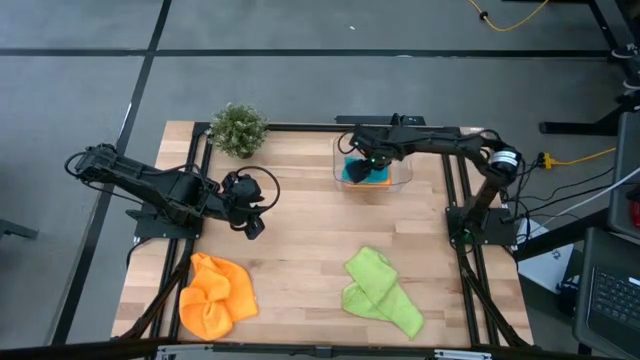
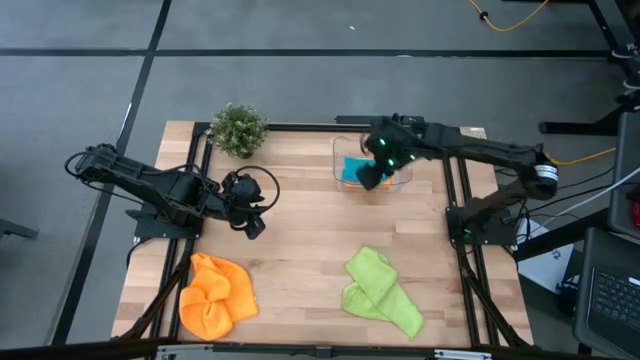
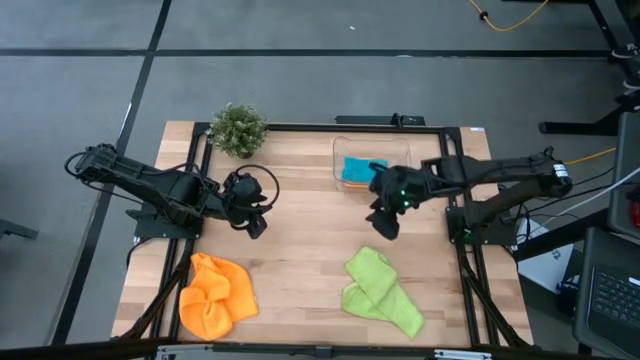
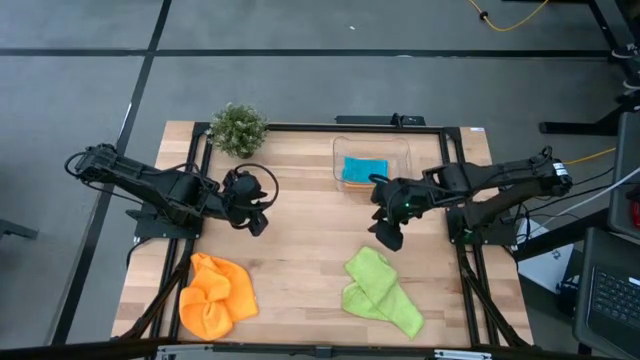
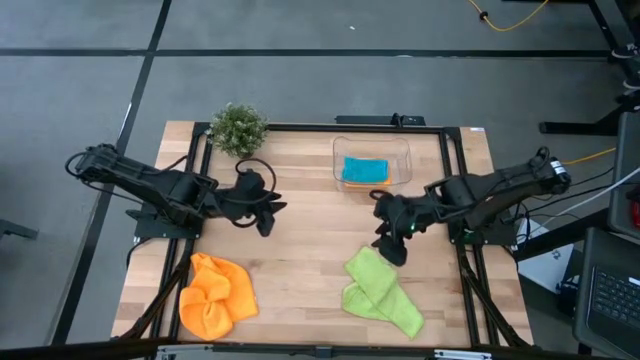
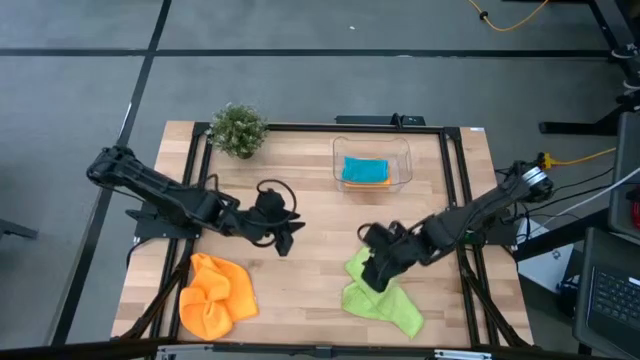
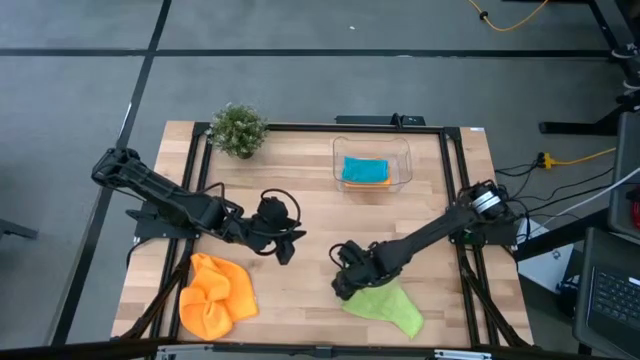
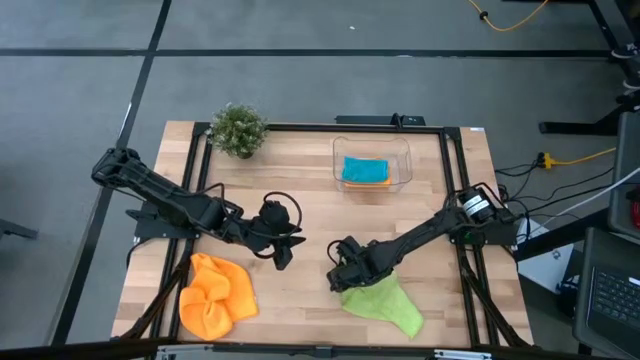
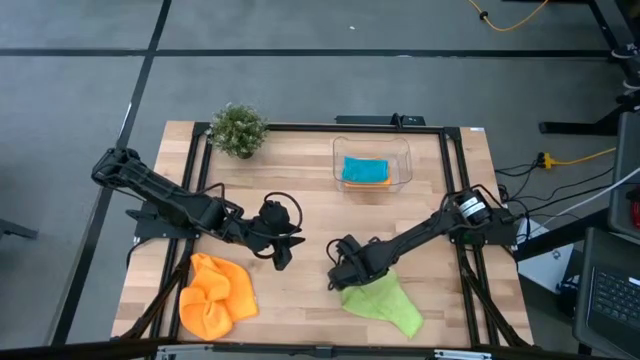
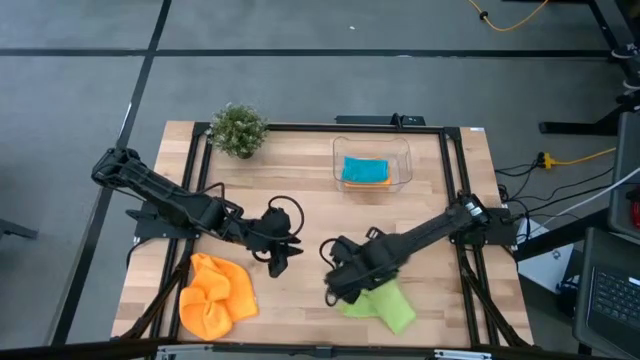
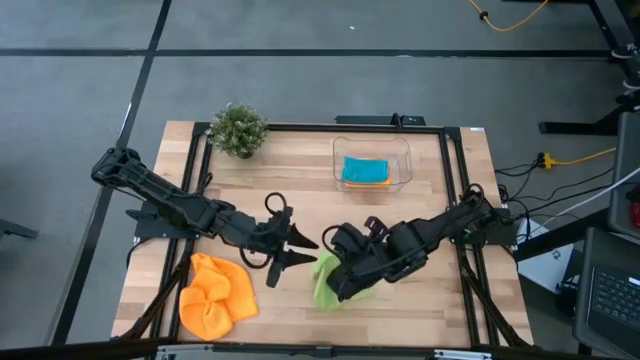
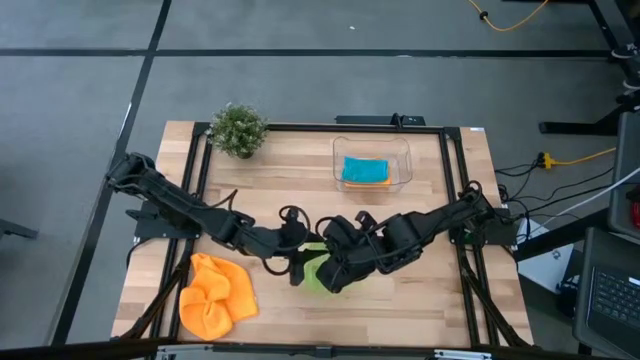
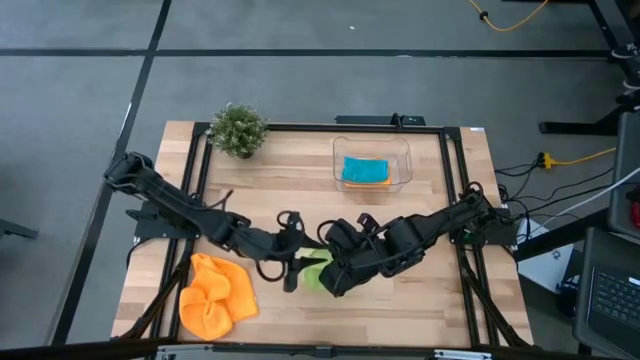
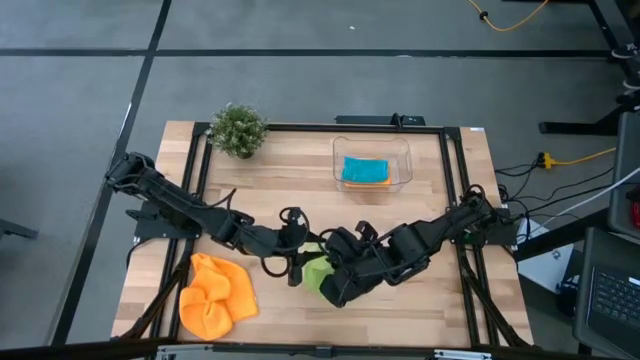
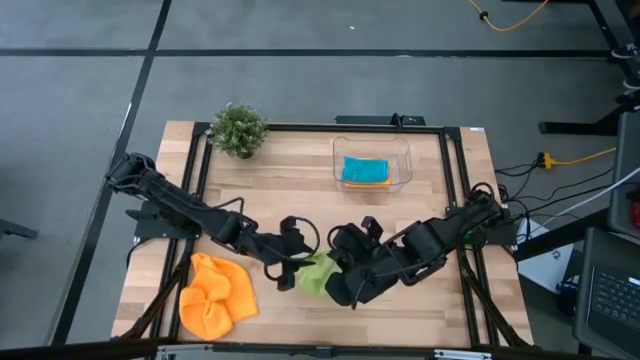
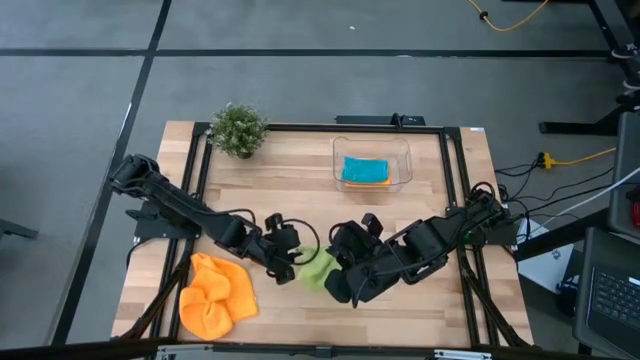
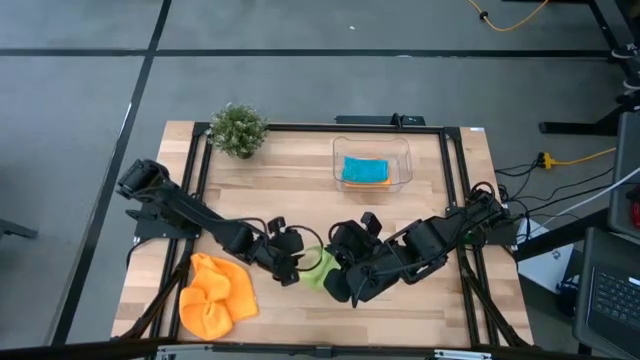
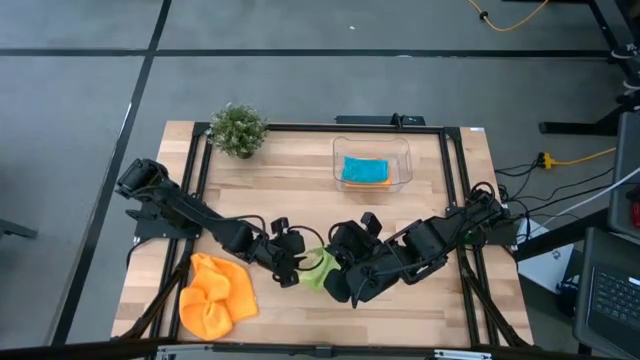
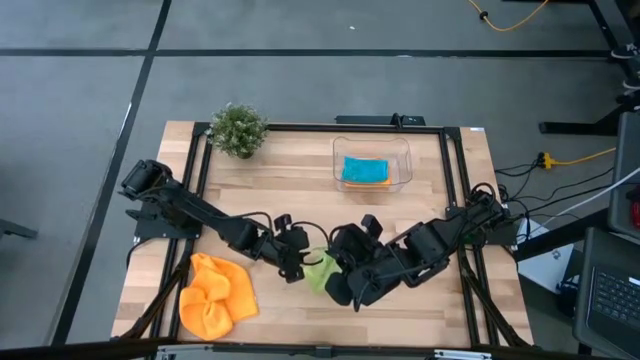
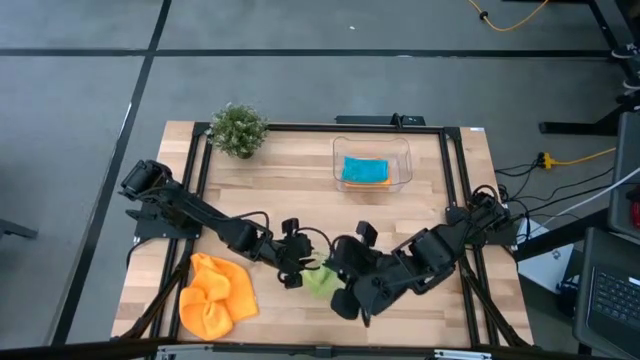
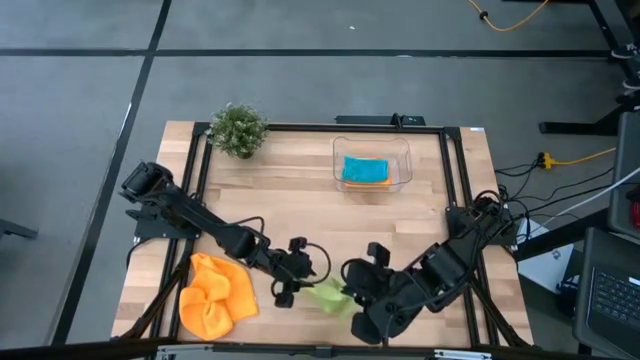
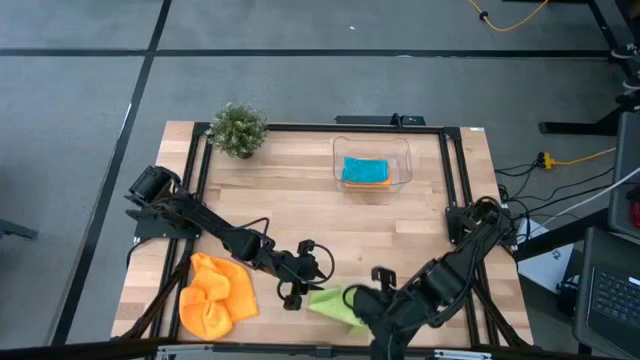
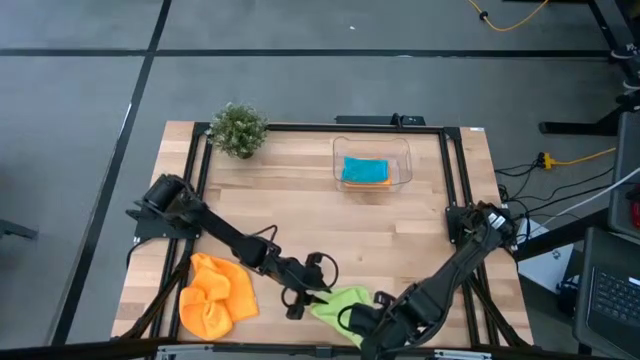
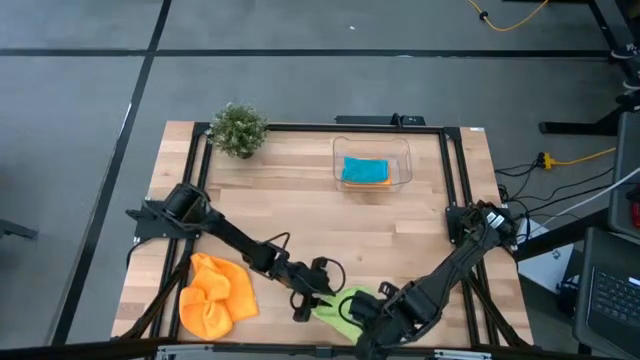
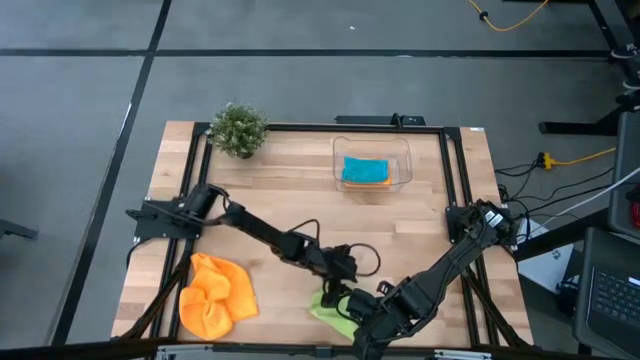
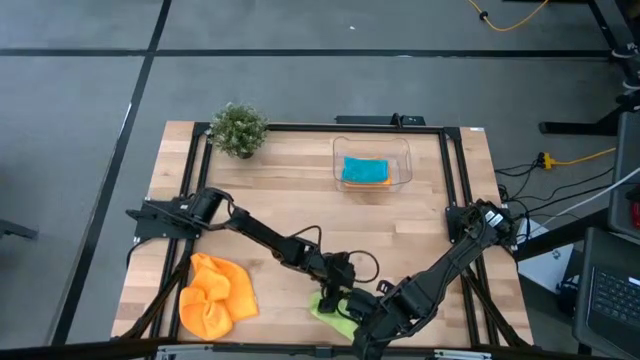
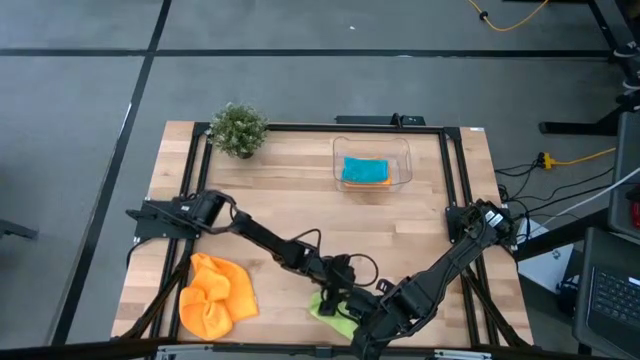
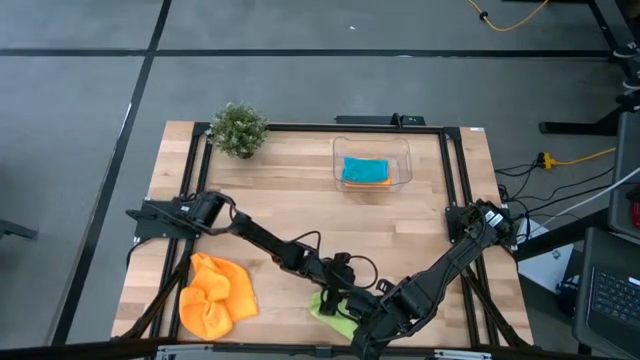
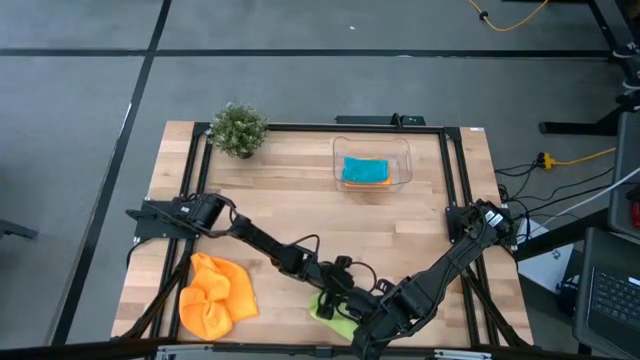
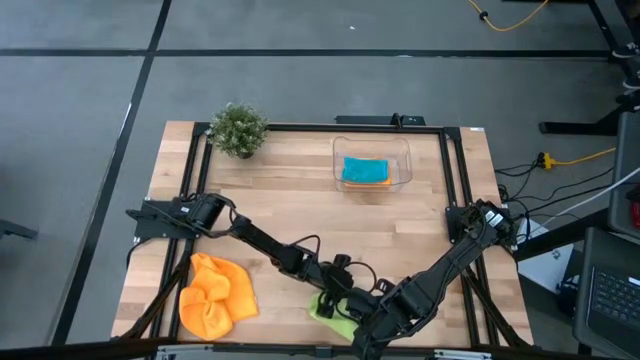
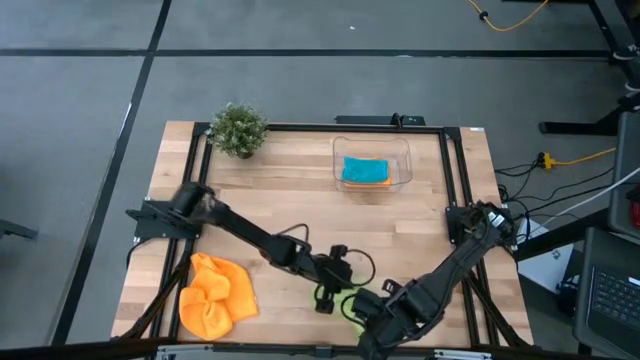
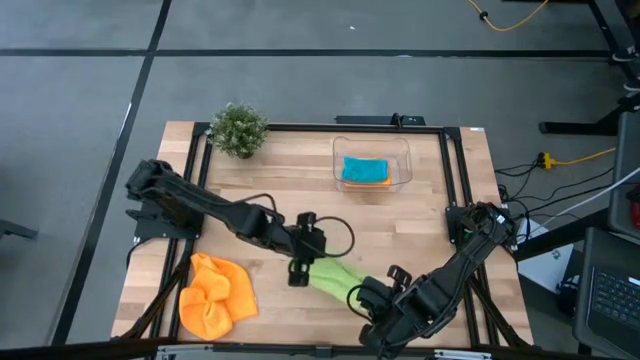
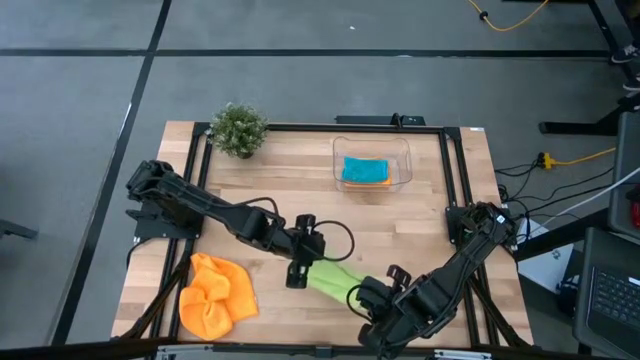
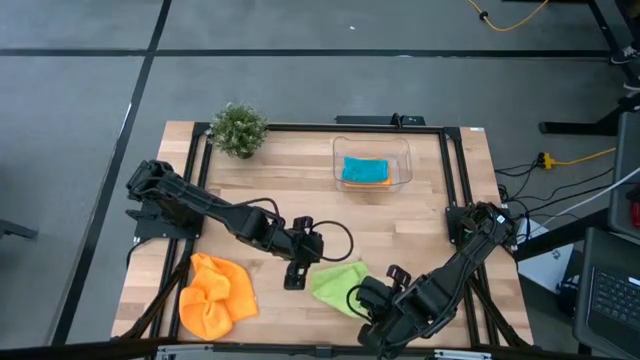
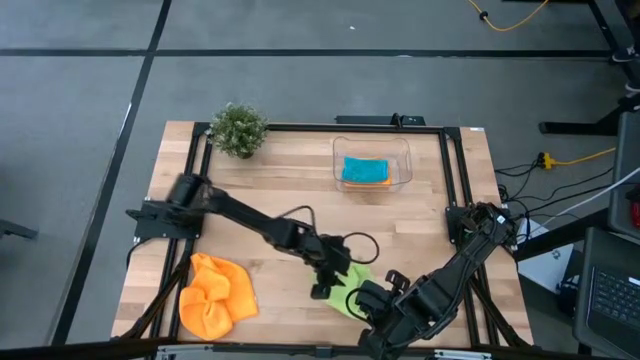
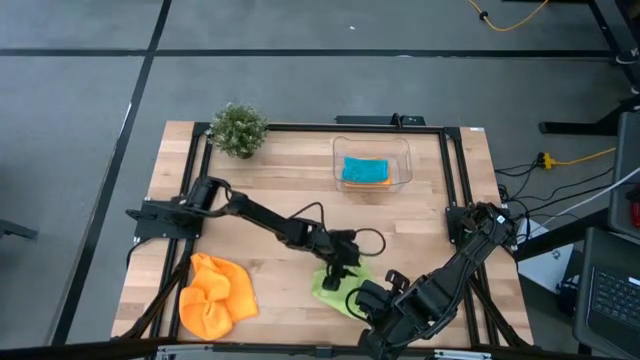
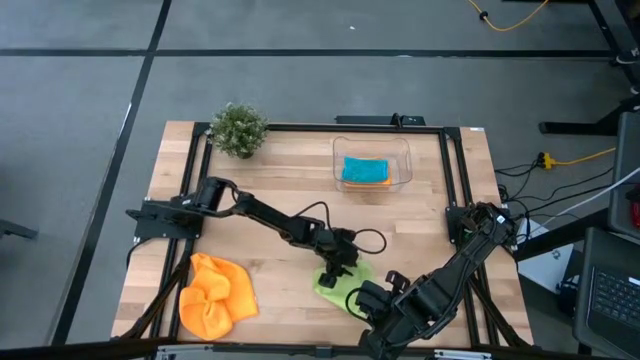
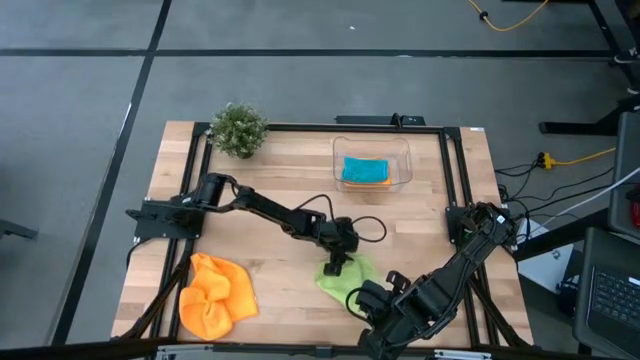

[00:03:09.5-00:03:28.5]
Task: Fold microfiber towels
Fold the green microfiber cloth
